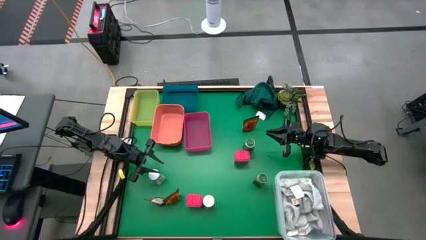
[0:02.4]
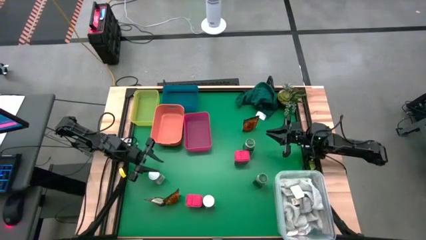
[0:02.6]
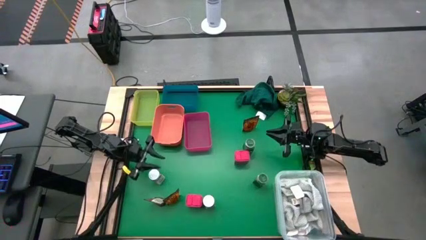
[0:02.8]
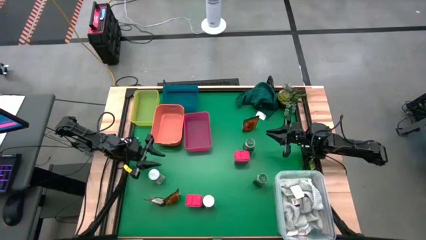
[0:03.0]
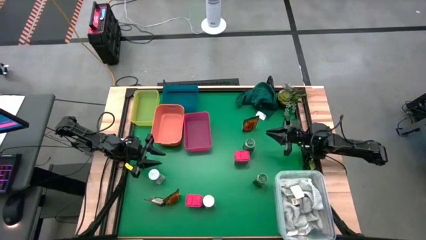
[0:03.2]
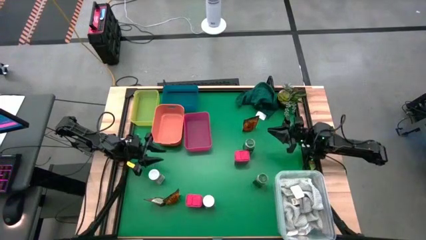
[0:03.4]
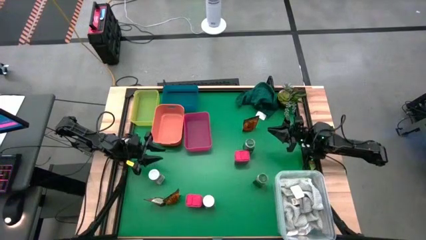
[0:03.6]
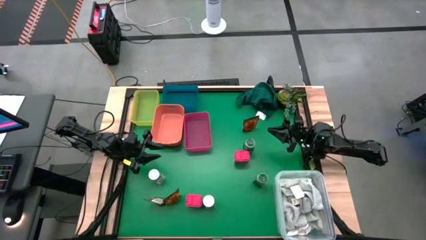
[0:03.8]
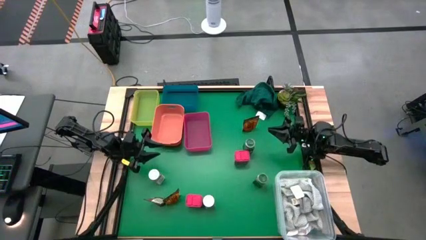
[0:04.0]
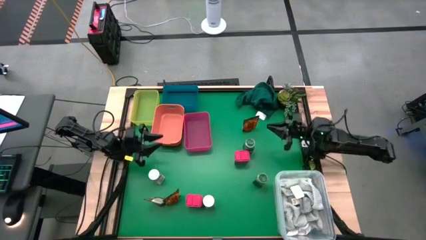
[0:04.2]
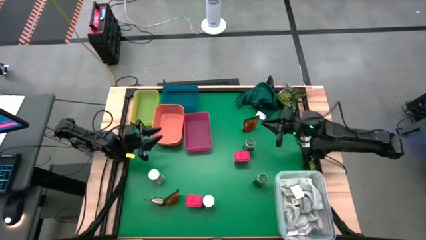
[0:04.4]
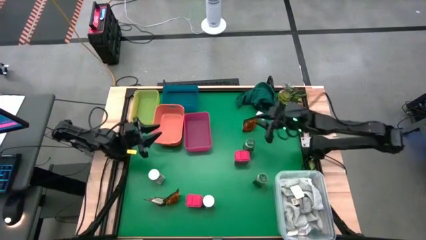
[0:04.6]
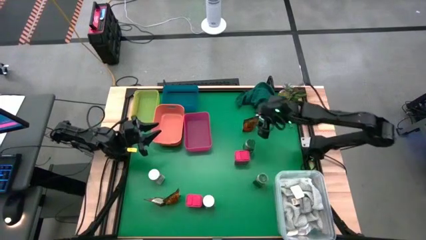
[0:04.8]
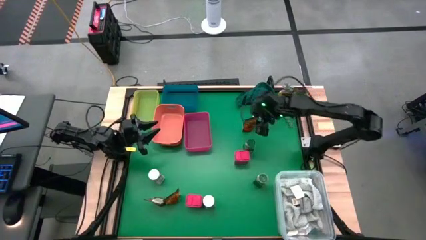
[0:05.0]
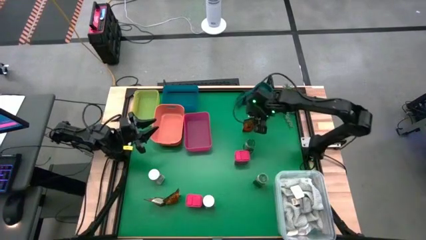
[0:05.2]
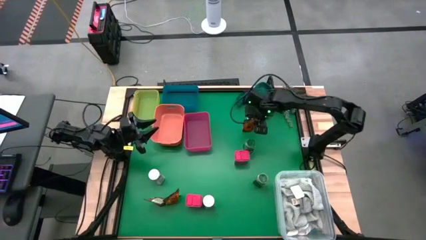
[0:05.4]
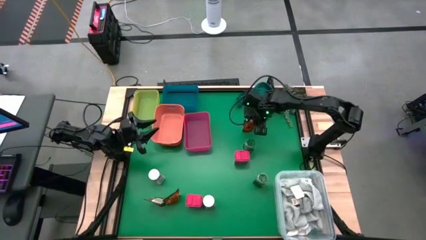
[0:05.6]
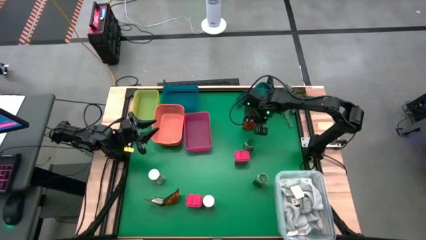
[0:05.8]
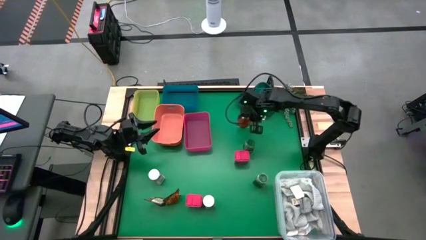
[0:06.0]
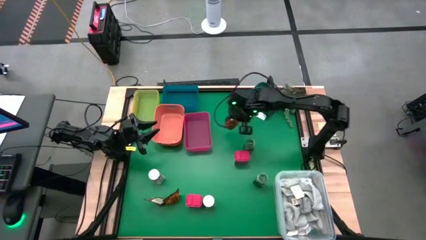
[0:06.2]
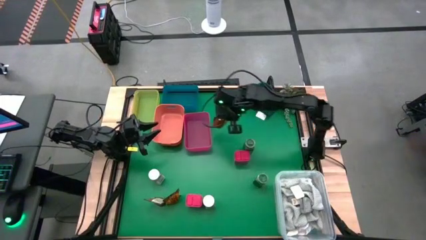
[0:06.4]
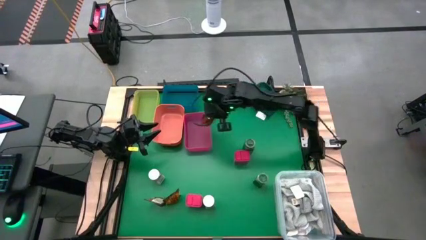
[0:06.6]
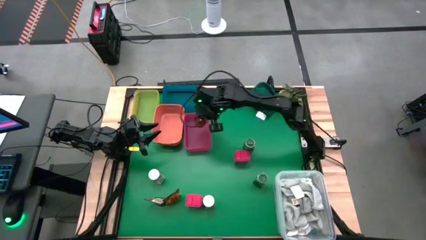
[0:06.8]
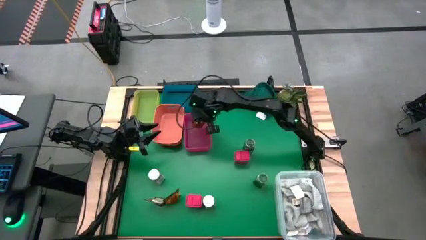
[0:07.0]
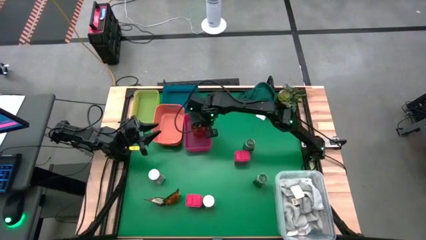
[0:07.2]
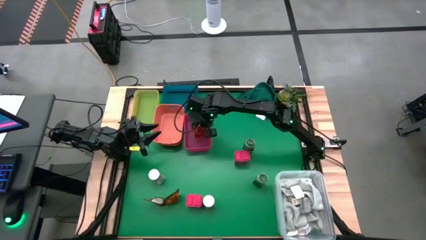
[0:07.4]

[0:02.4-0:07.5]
Task: Sort spices by type
Put the top orange seasoning pack into the red bin

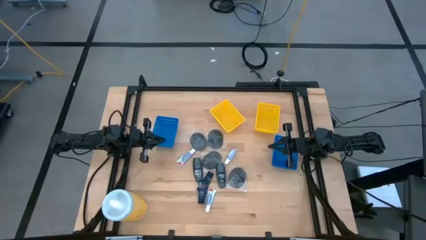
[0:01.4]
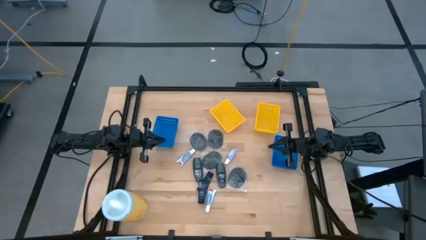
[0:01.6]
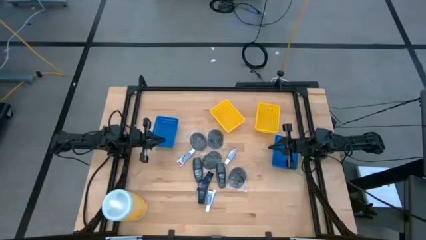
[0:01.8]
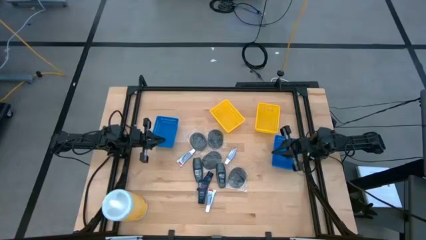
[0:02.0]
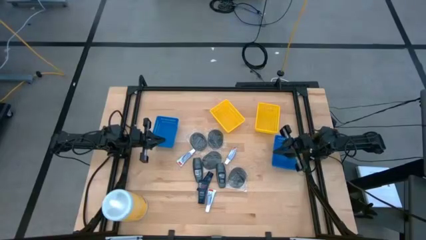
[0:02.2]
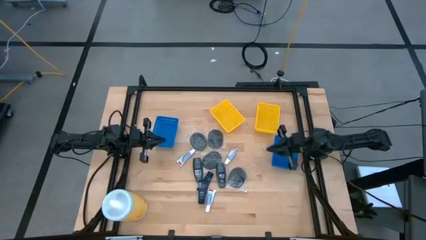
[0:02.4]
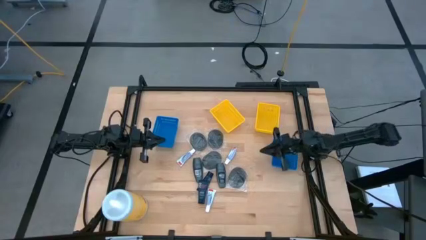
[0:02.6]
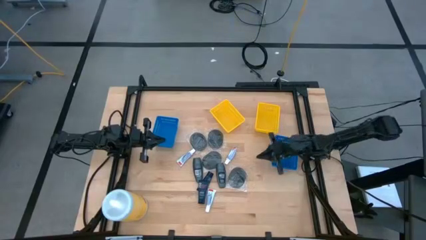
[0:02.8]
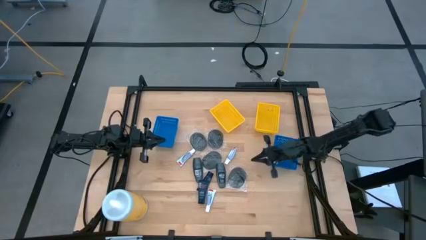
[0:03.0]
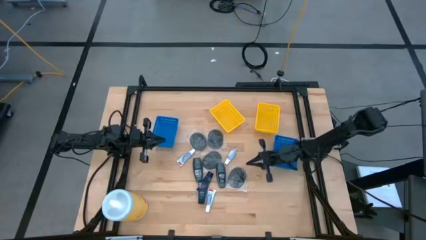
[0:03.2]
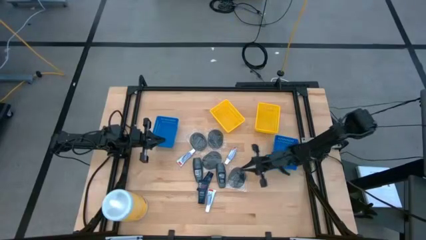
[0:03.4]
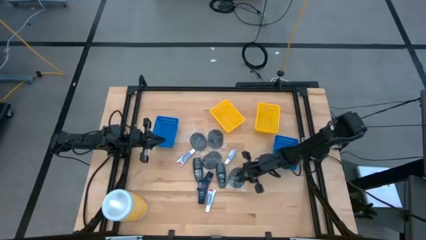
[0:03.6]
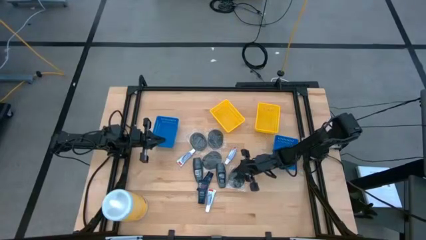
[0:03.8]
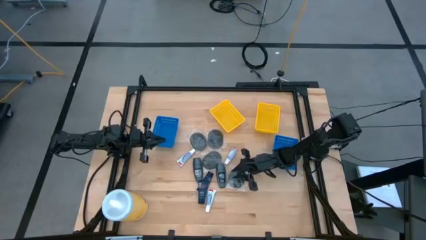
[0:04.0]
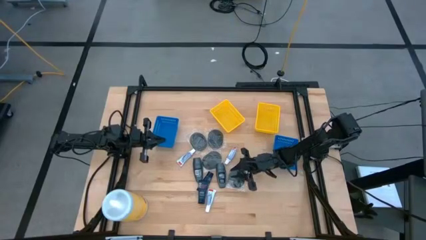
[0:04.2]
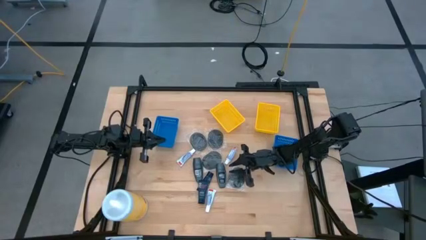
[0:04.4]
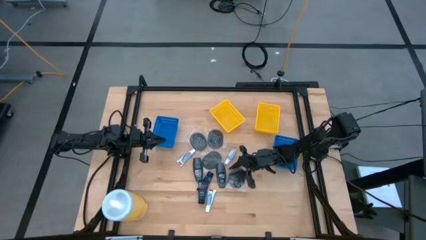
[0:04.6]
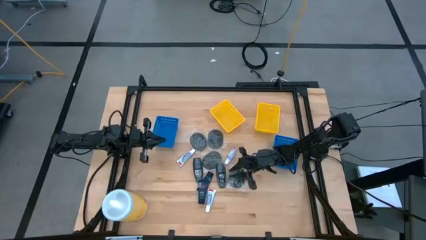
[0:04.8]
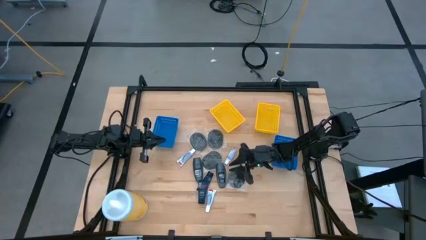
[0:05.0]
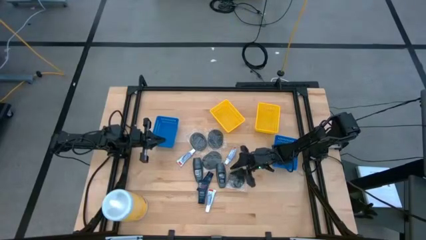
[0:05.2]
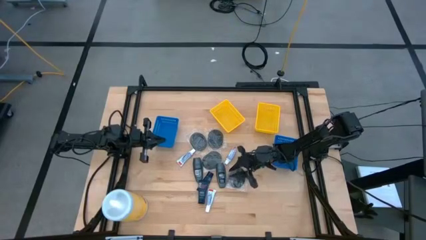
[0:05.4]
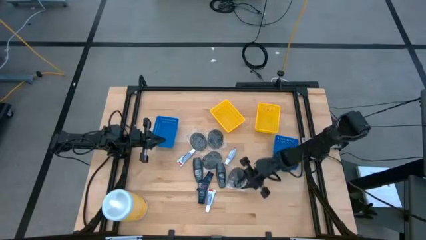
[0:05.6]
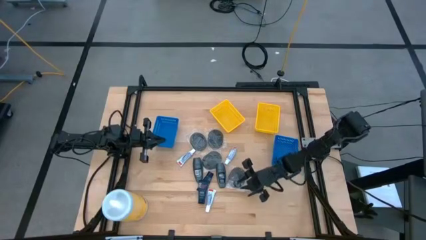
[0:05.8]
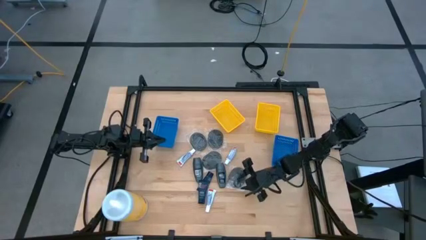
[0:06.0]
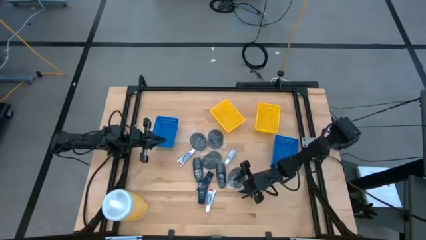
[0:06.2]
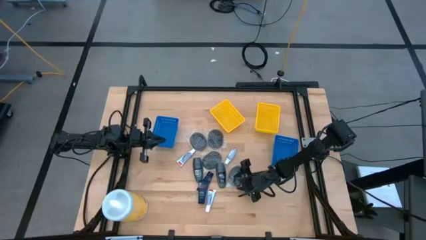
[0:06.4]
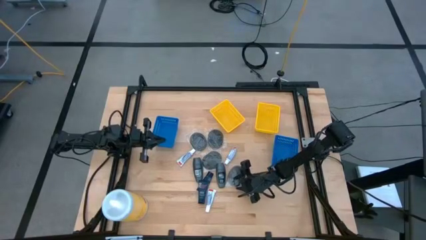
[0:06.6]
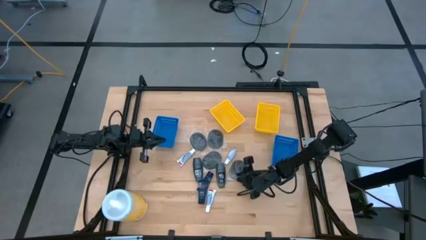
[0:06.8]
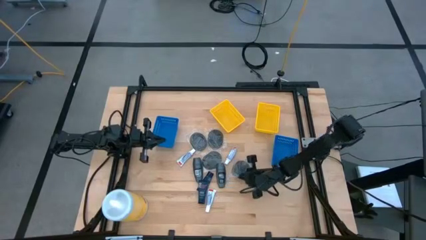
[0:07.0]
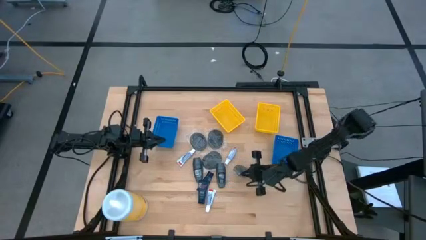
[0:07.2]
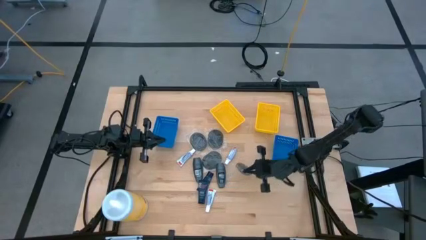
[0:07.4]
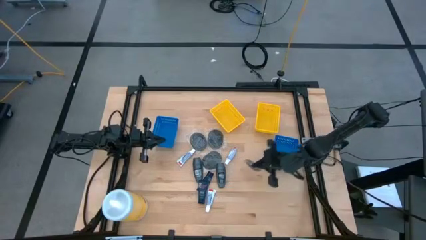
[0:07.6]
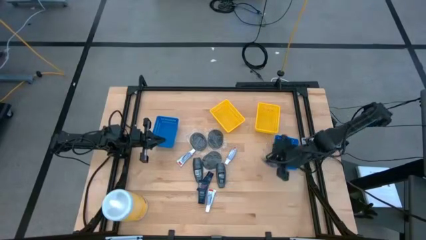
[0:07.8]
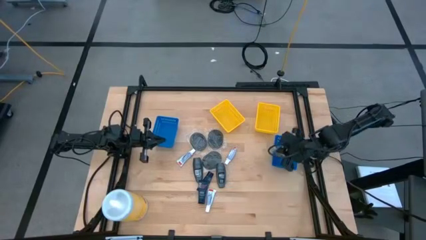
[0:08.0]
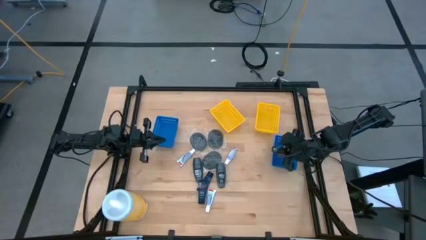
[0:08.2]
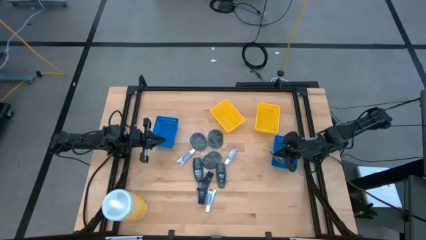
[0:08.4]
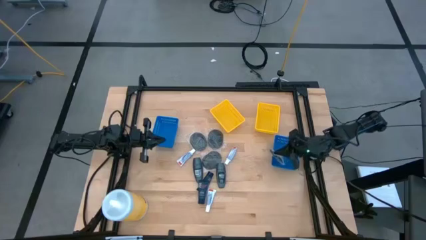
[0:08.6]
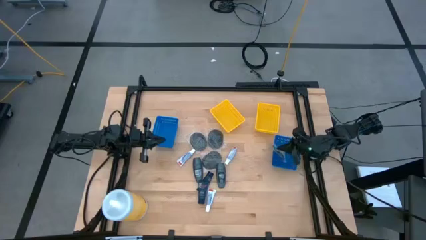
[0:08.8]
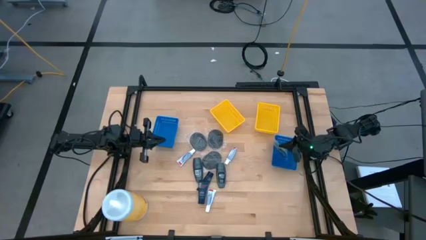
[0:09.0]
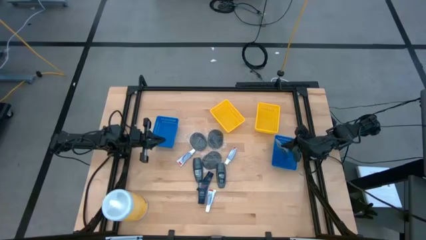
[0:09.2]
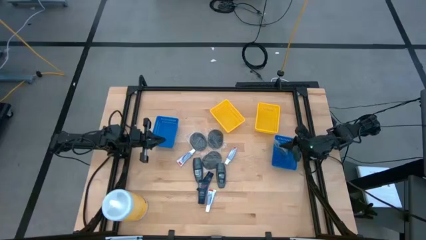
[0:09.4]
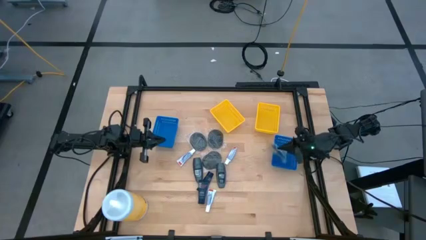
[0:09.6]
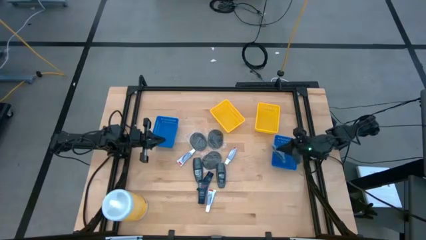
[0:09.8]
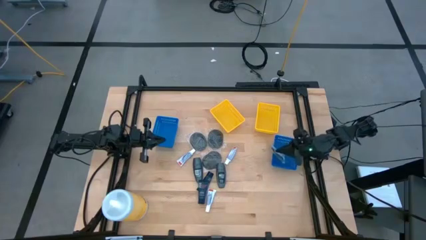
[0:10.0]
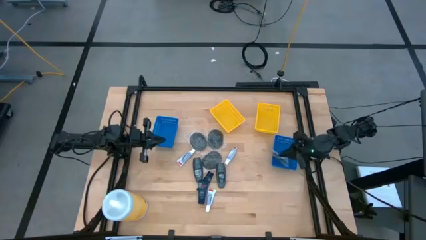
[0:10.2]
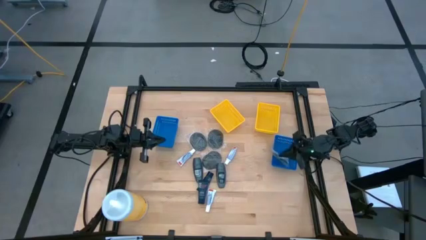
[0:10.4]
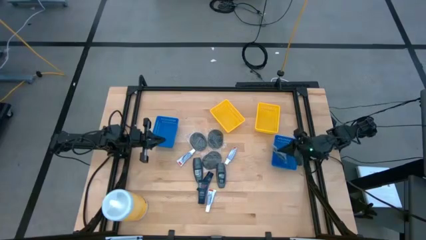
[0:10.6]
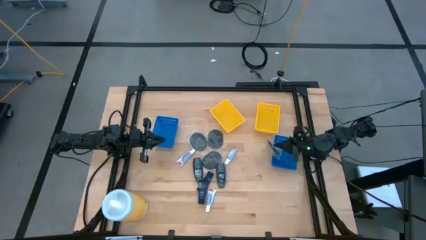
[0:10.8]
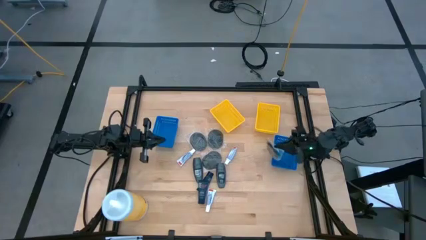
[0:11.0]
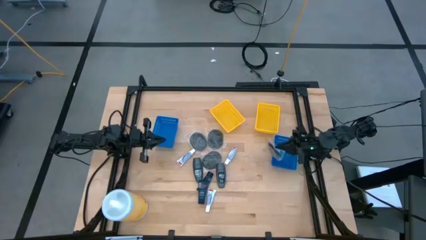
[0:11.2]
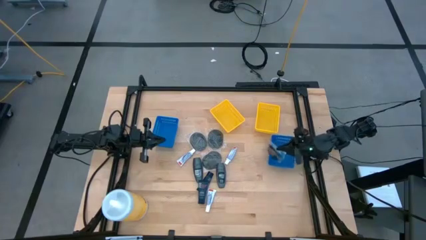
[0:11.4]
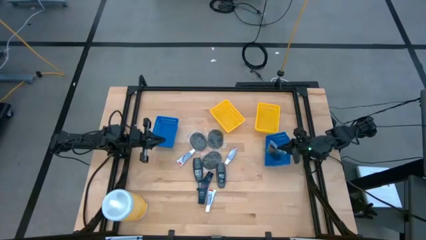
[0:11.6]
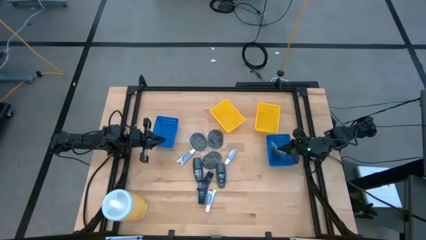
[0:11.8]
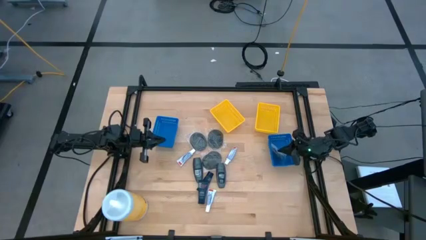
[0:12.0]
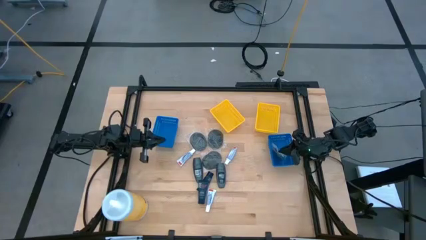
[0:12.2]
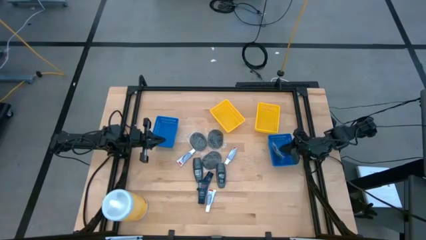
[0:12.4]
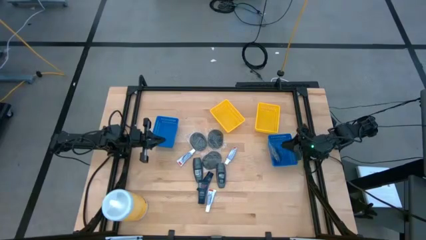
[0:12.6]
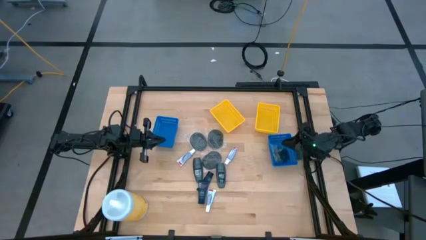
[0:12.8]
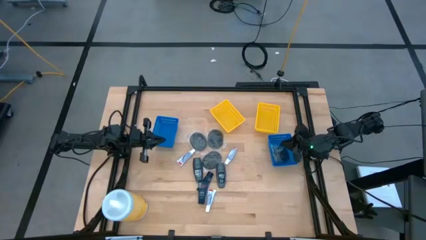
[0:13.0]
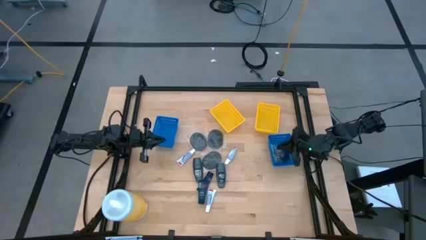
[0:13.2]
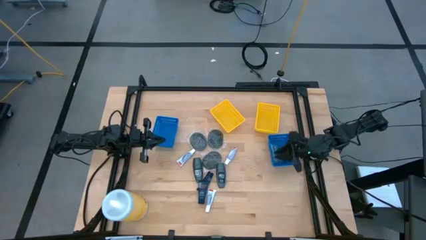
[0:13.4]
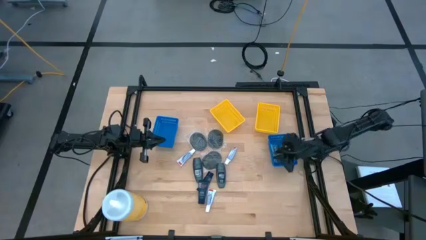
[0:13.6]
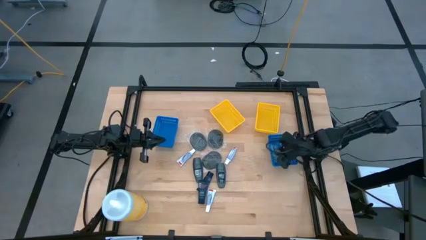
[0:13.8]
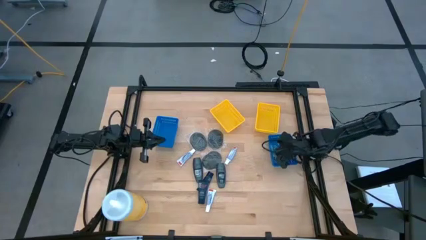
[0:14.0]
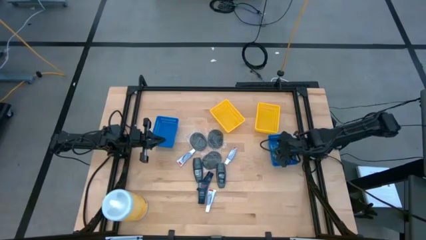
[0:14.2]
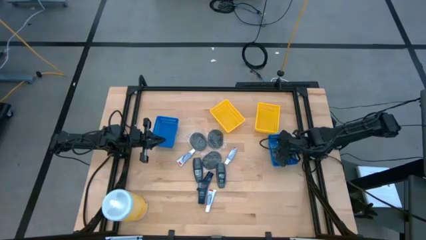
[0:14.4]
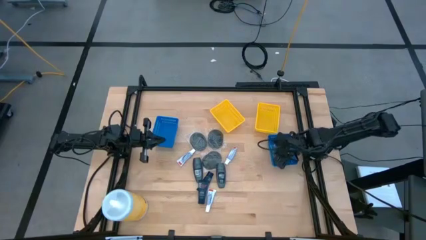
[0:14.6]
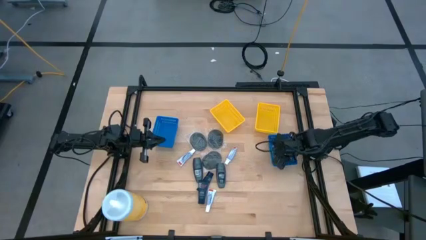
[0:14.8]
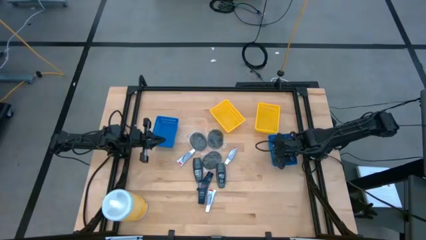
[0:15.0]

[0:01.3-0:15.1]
Task: Pick & Place Travel size toiletries
Put the right black hairbrush into the right blue bin
